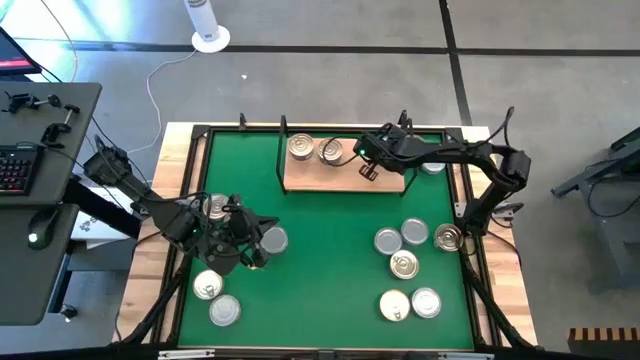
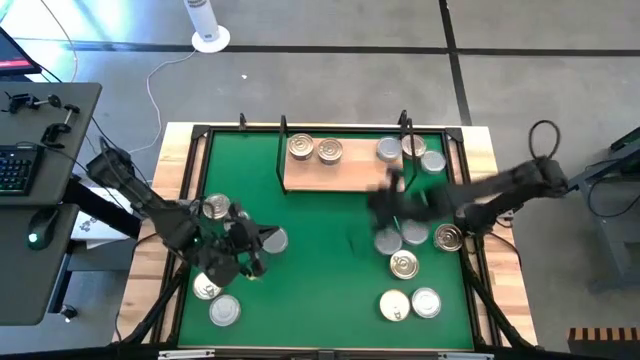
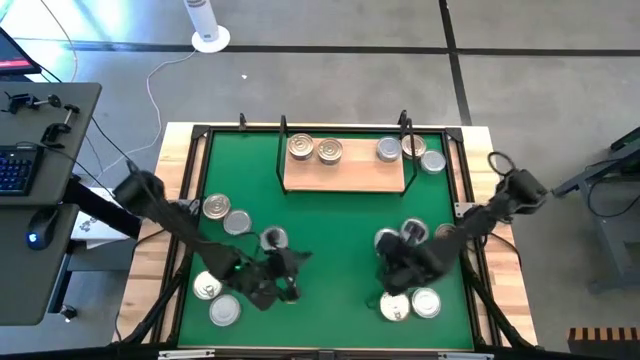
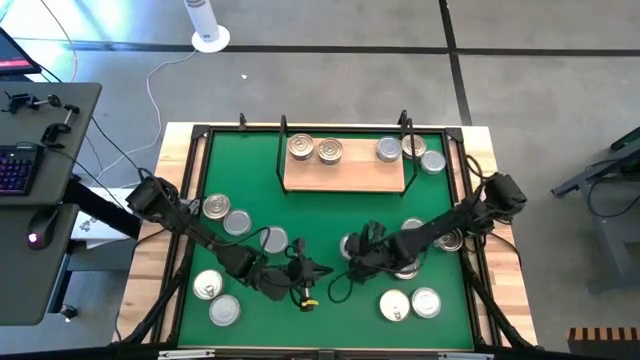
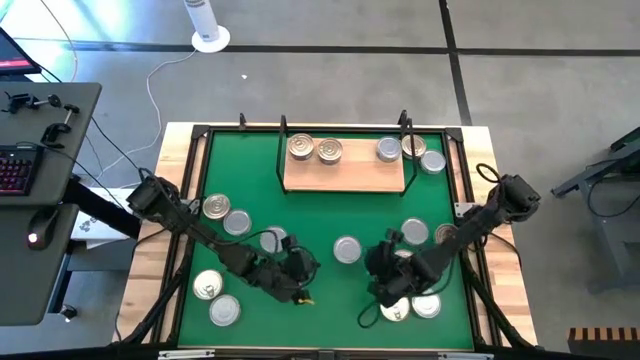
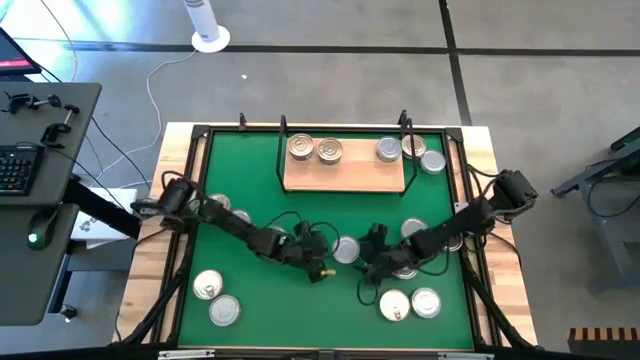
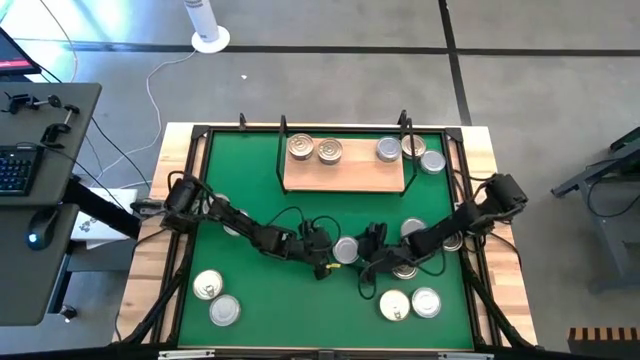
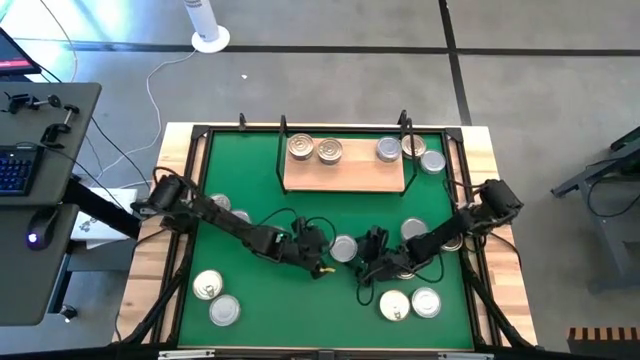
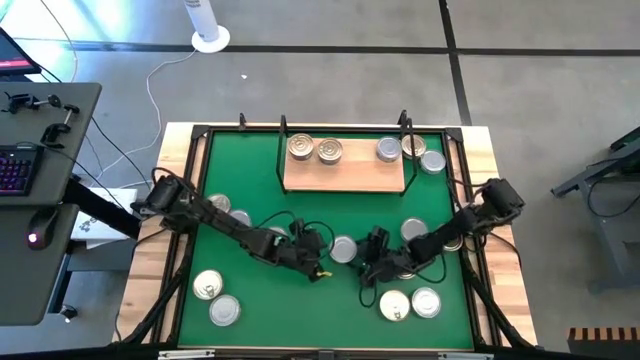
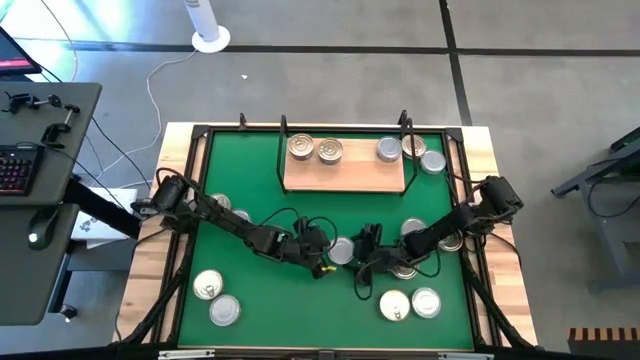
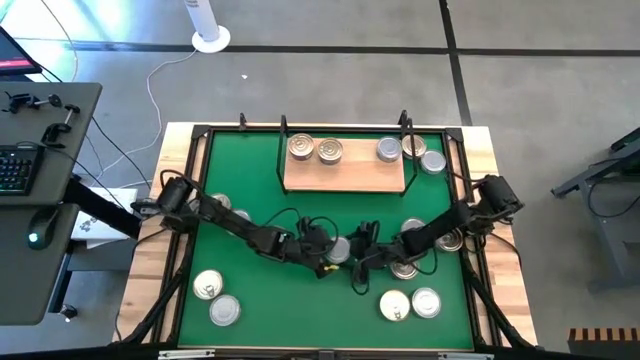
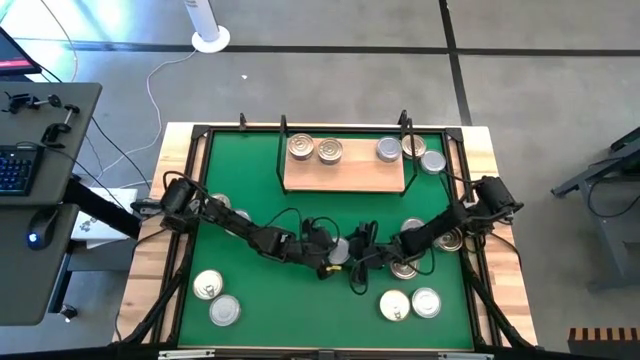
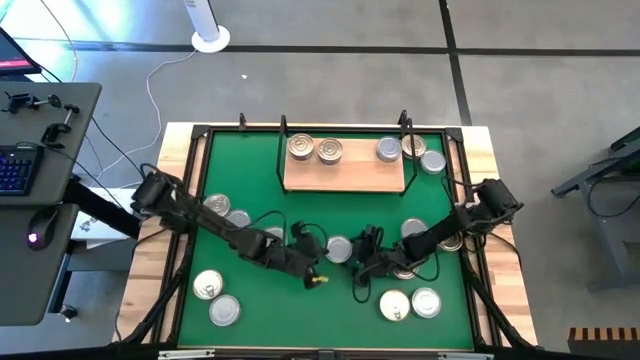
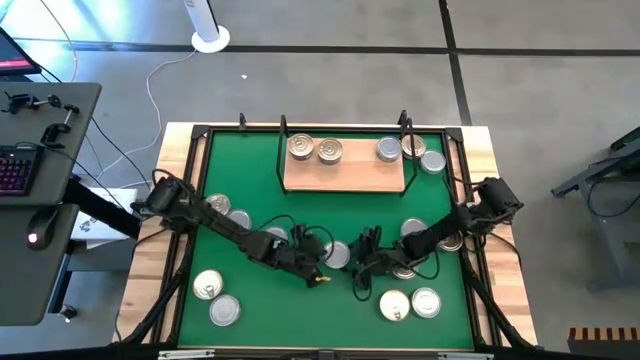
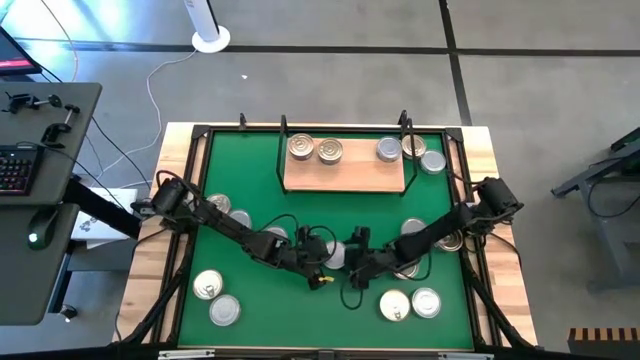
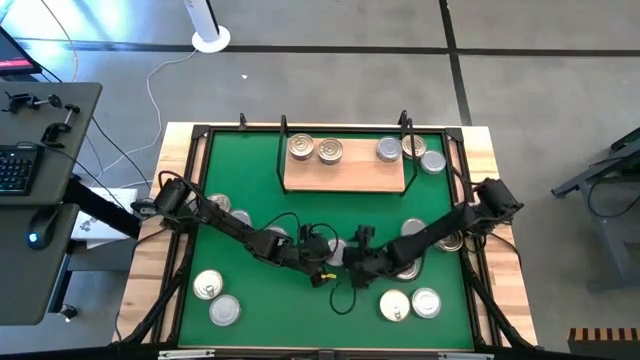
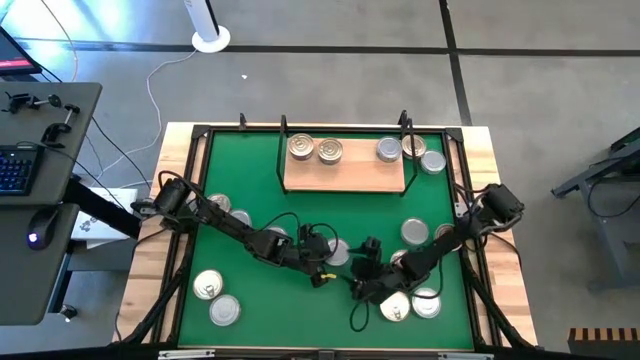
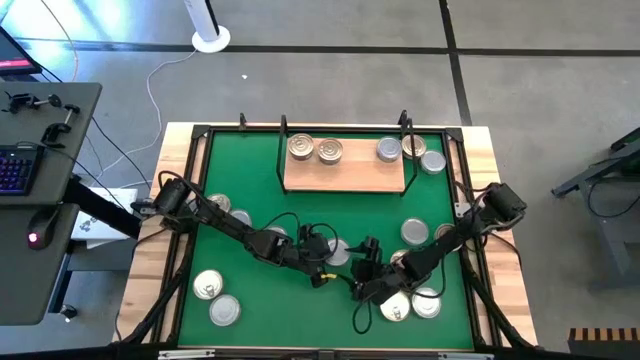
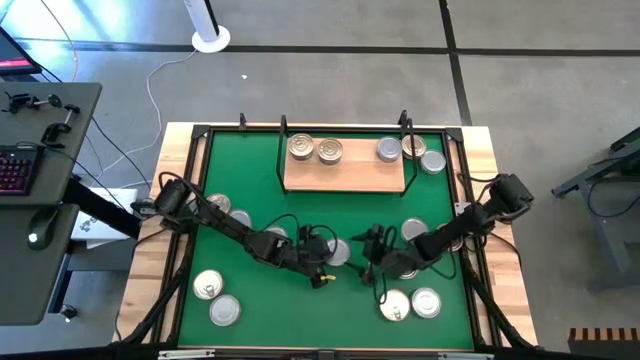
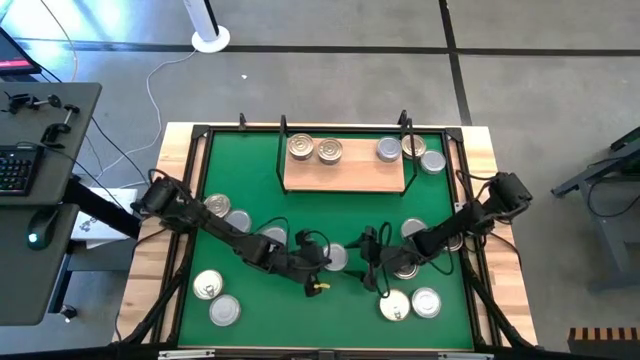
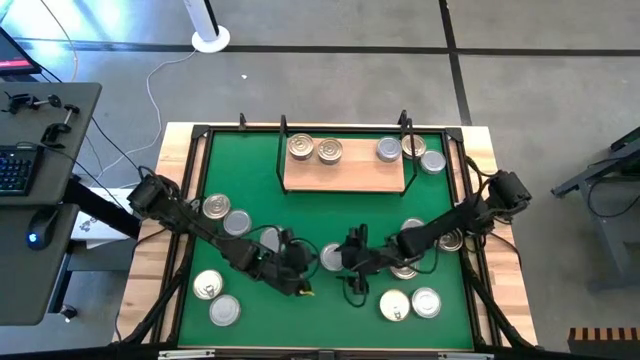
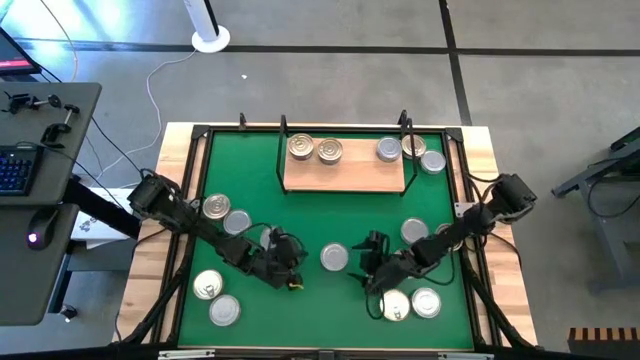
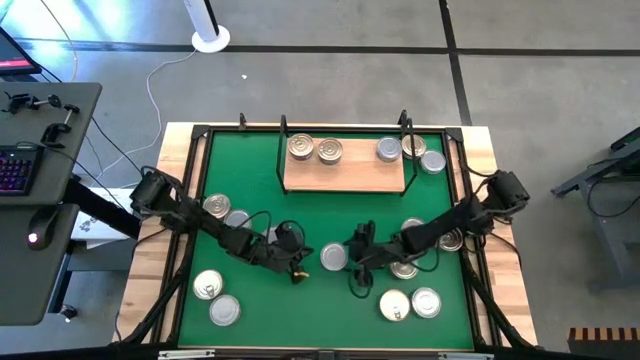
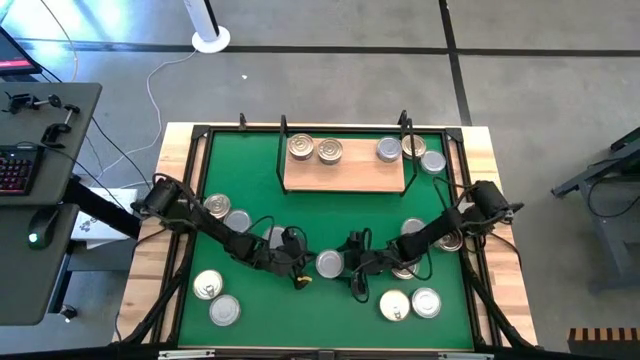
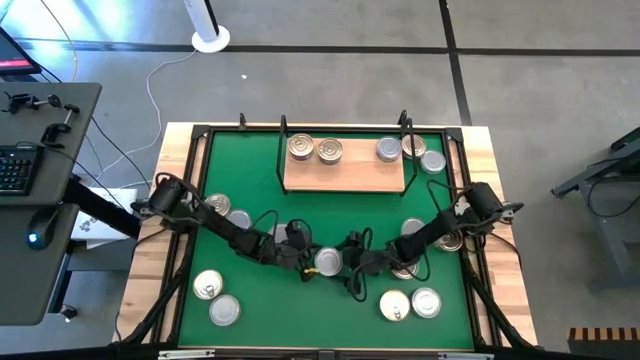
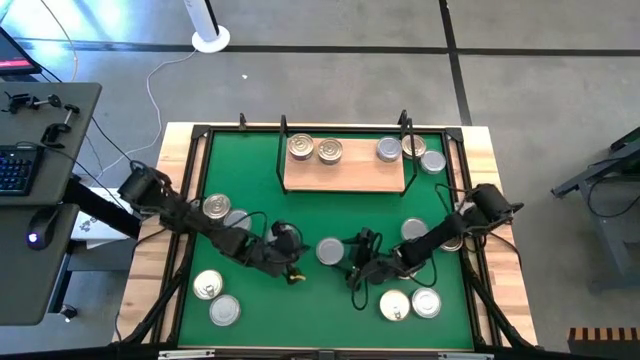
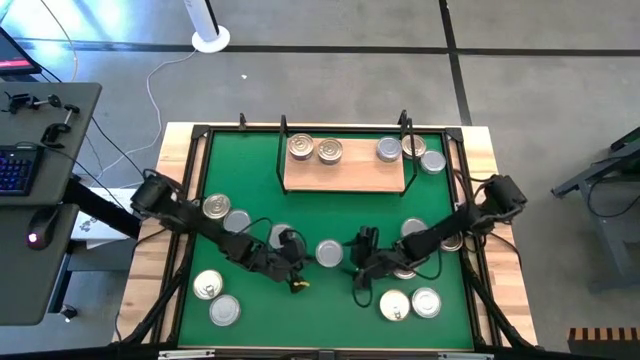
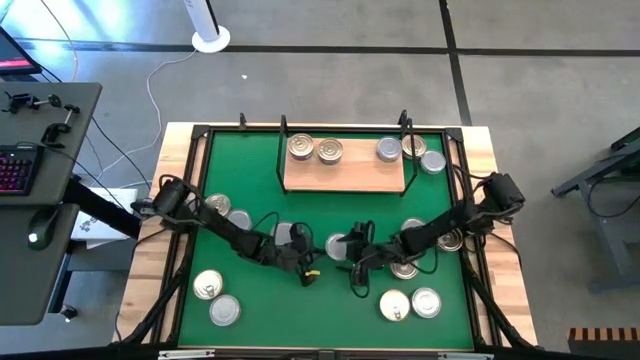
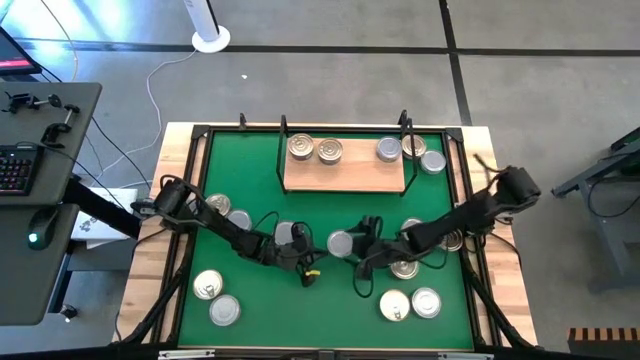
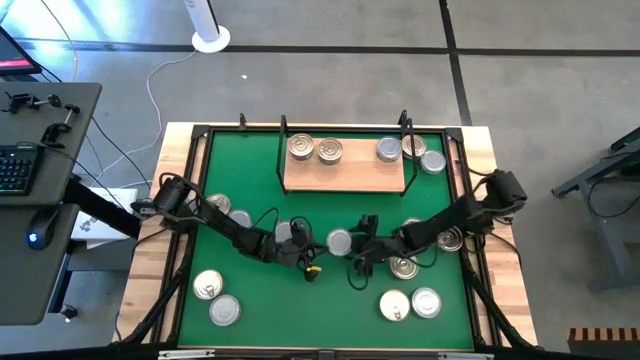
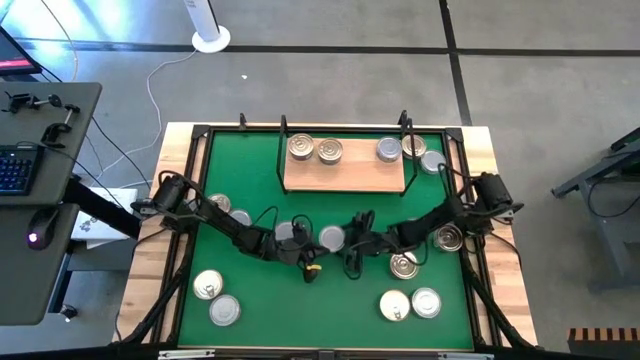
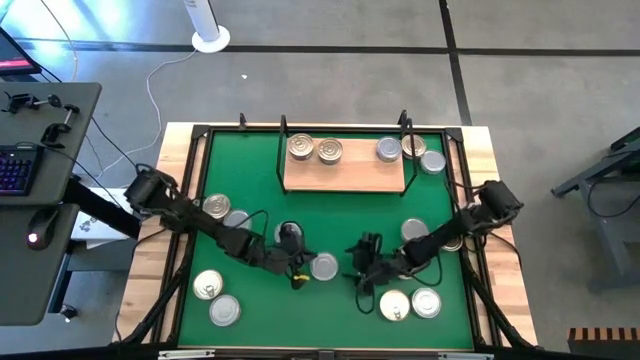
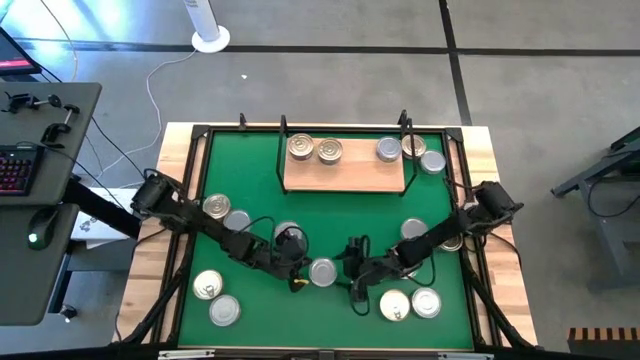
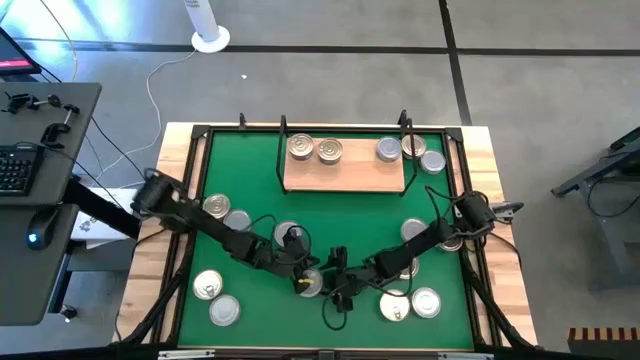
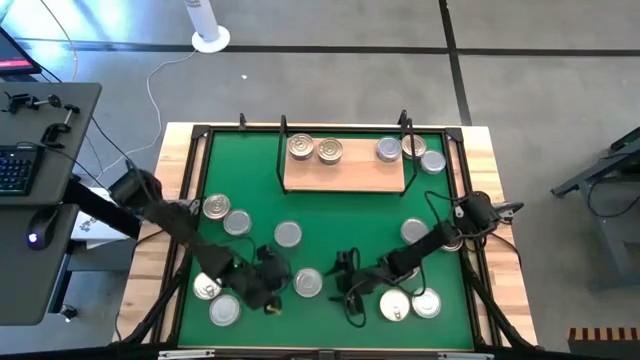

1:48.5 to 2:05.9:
Task: Stack canned seafood by type on shelf
Put the green tuna can on the shelf

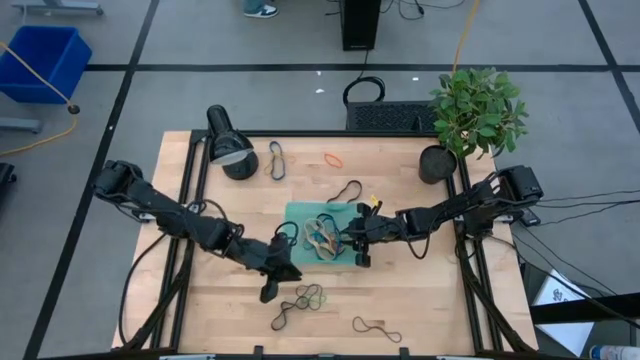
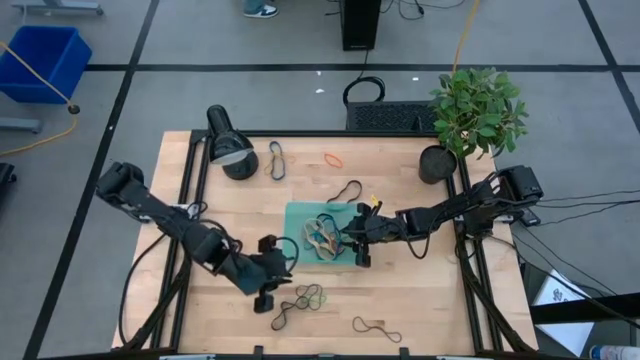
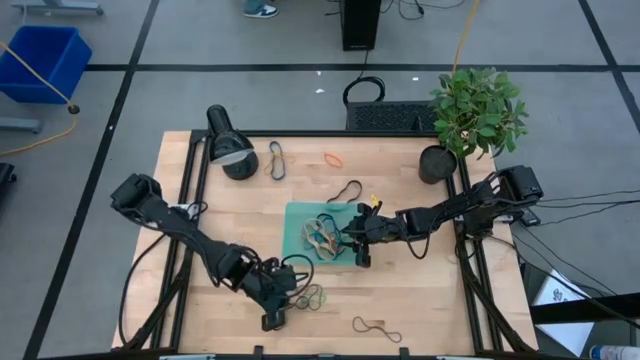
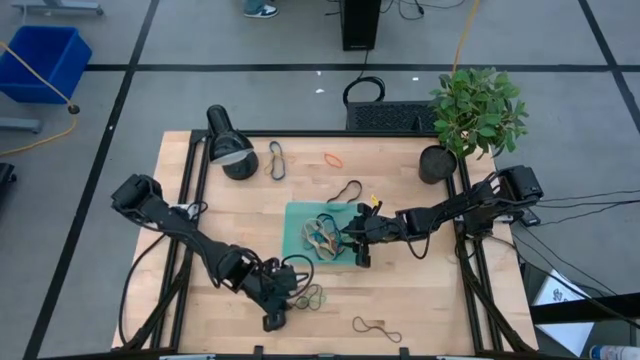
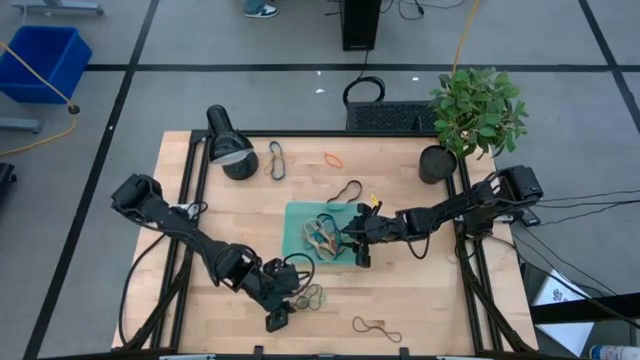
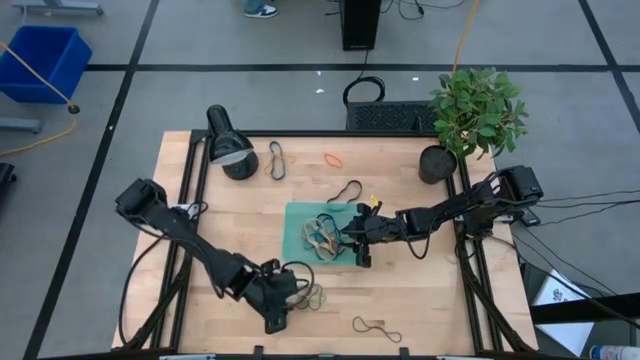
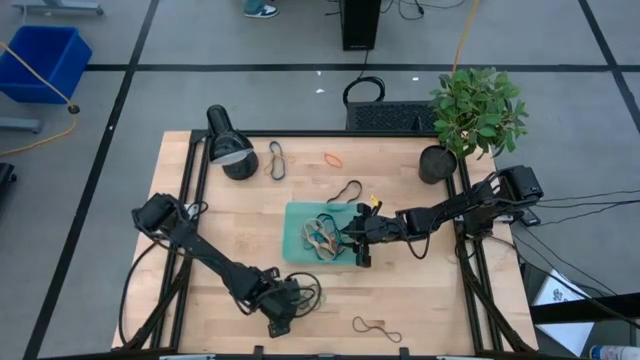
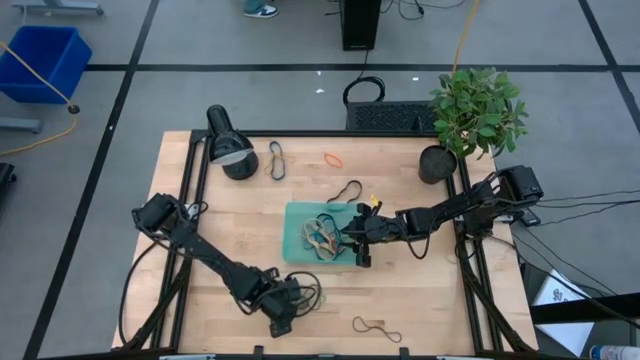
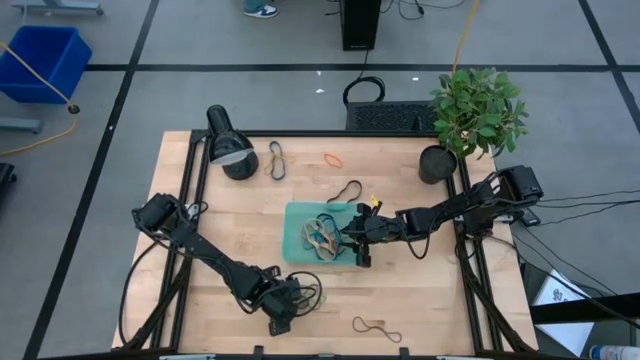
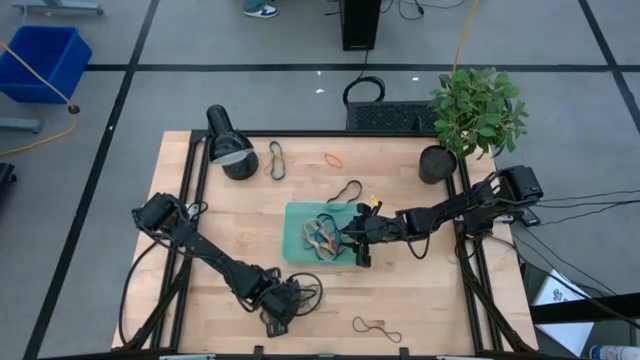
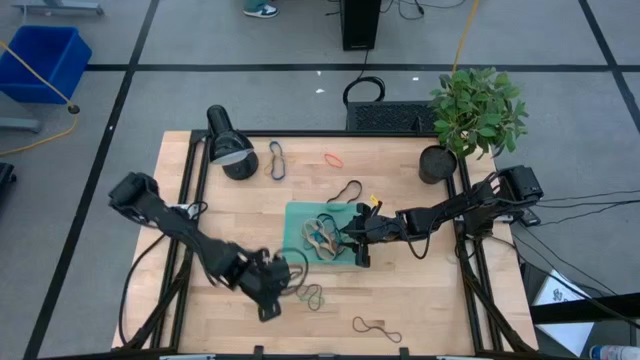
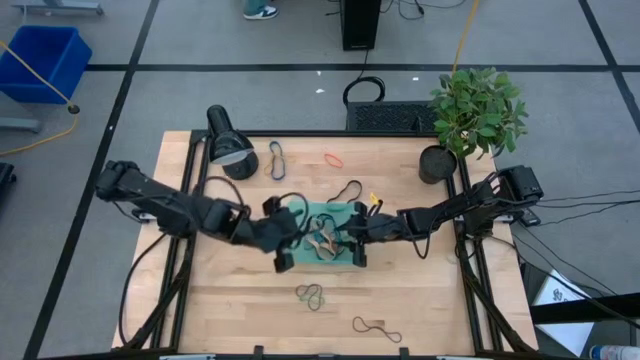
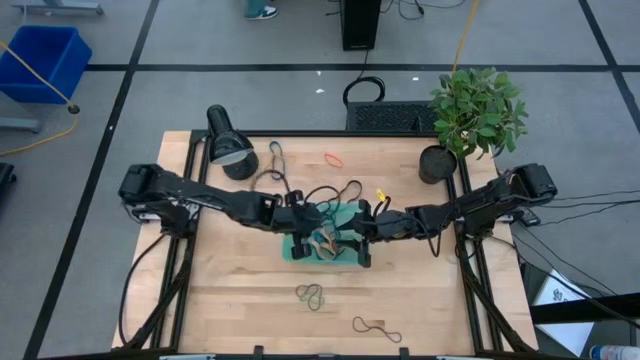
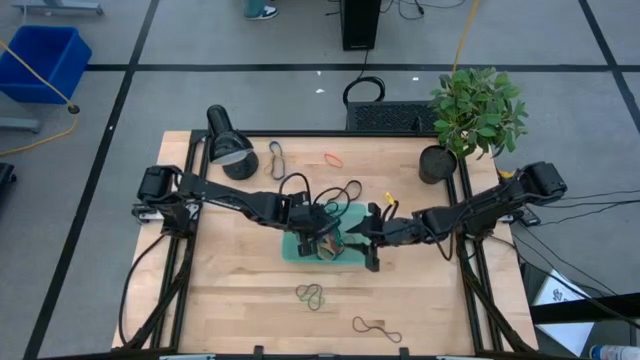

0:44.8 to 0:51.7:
Task: Pick and place rubber bands into bin
Put the black rubber band into the green bin
